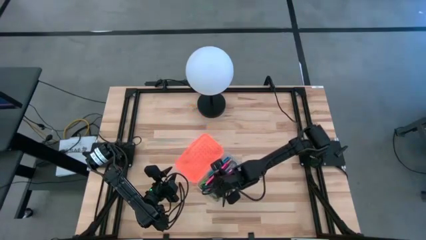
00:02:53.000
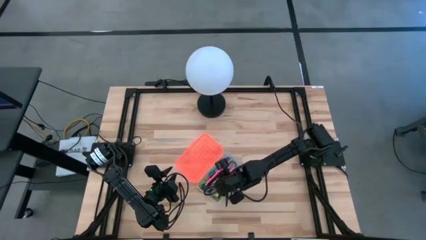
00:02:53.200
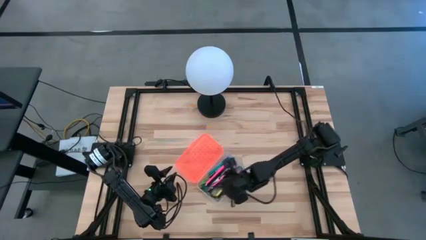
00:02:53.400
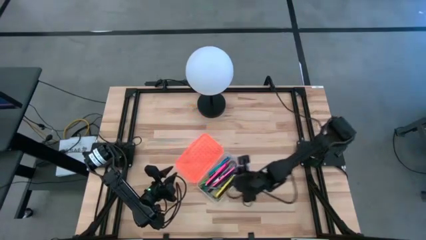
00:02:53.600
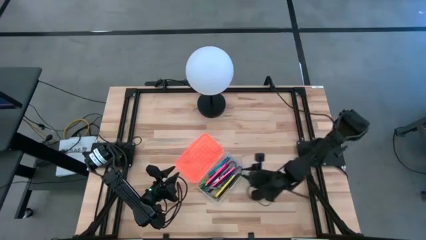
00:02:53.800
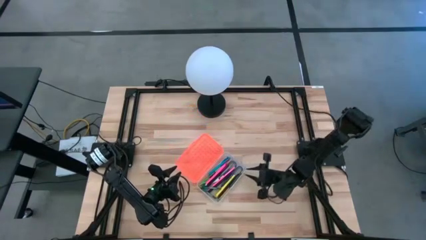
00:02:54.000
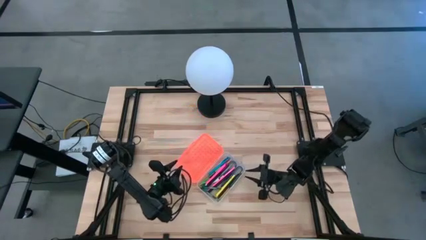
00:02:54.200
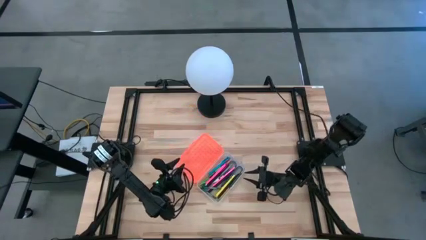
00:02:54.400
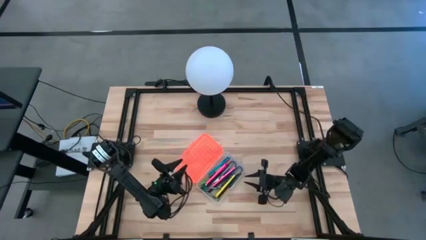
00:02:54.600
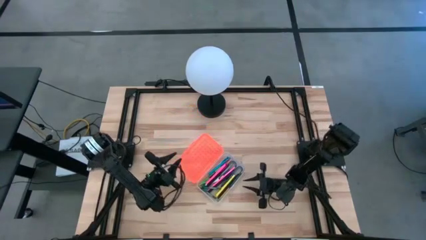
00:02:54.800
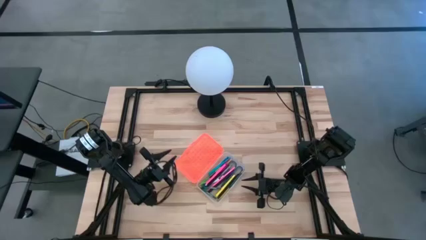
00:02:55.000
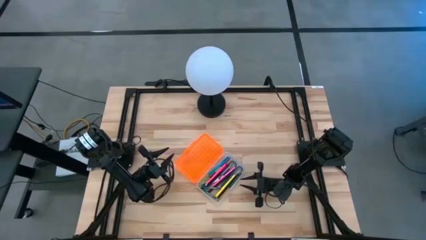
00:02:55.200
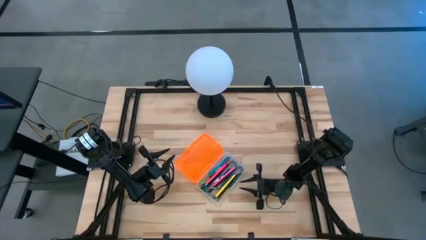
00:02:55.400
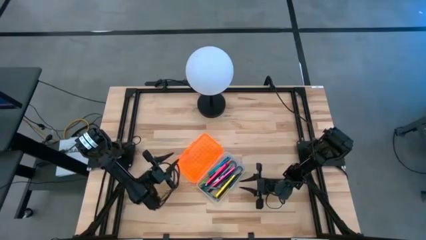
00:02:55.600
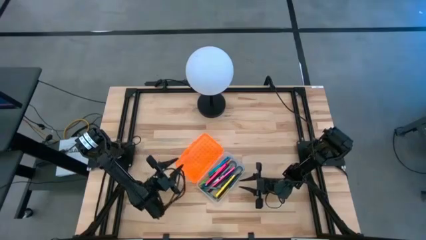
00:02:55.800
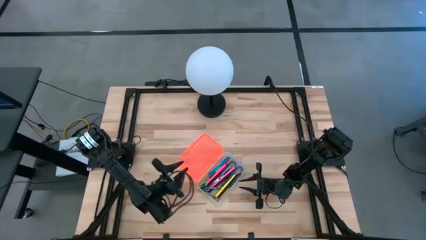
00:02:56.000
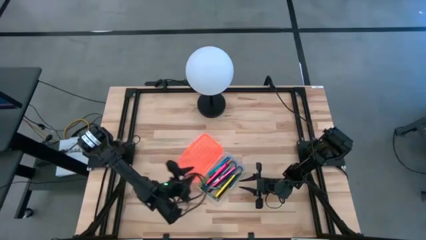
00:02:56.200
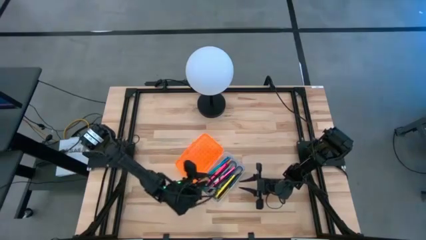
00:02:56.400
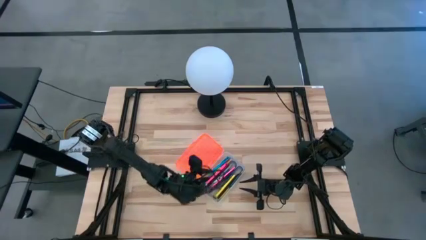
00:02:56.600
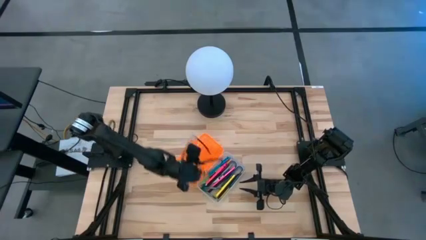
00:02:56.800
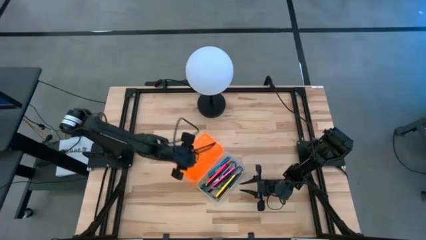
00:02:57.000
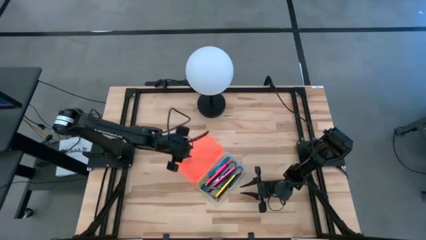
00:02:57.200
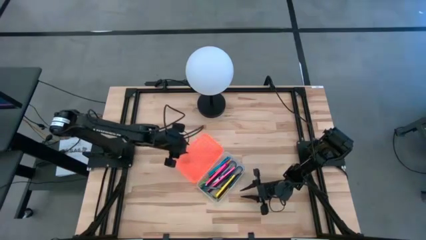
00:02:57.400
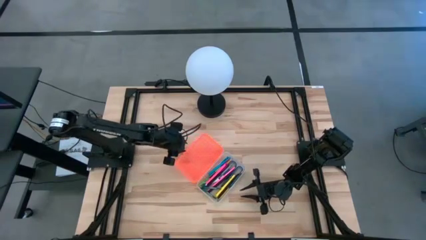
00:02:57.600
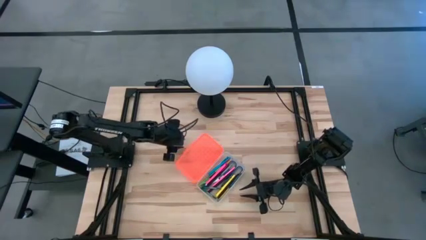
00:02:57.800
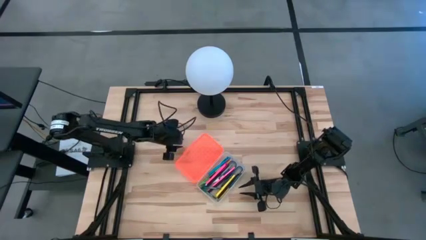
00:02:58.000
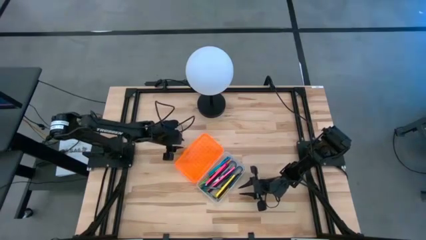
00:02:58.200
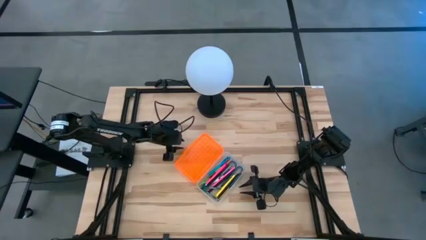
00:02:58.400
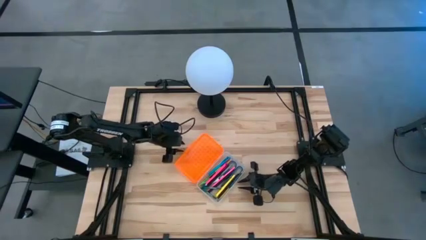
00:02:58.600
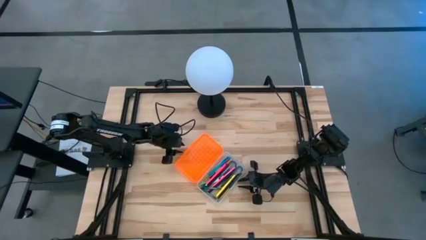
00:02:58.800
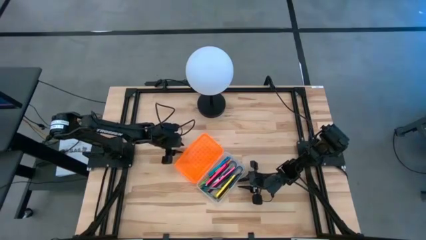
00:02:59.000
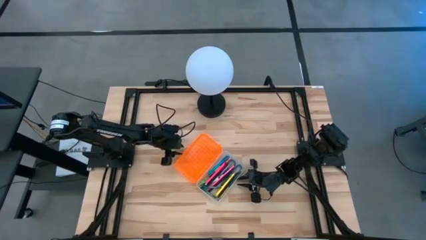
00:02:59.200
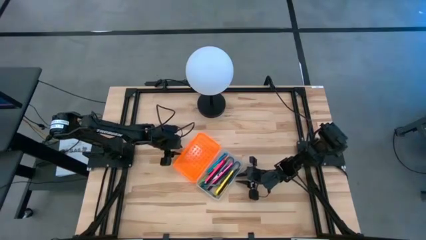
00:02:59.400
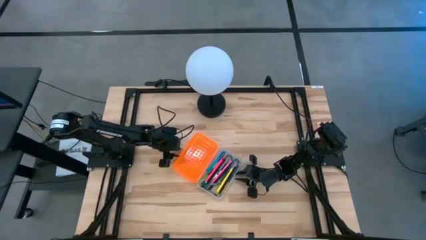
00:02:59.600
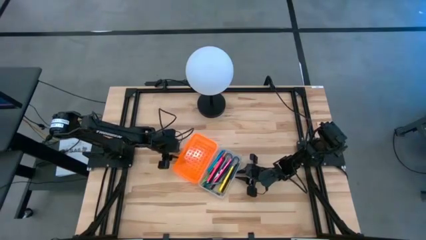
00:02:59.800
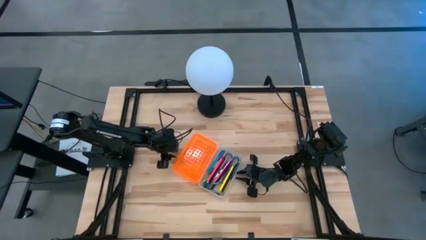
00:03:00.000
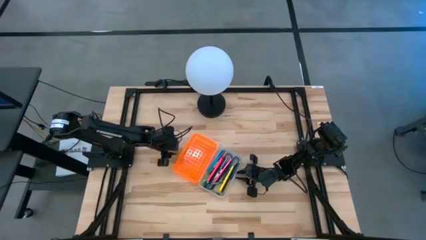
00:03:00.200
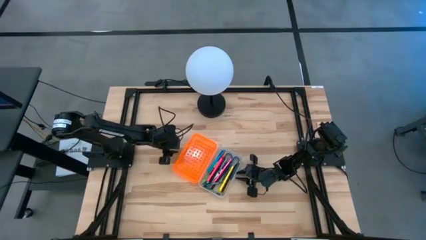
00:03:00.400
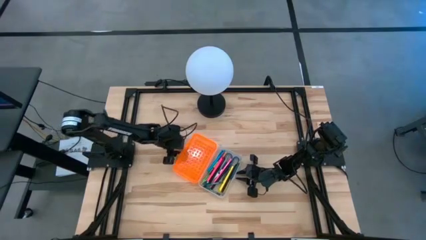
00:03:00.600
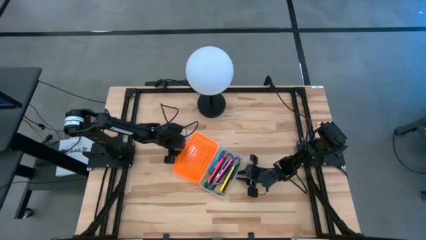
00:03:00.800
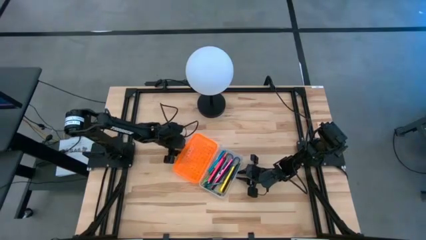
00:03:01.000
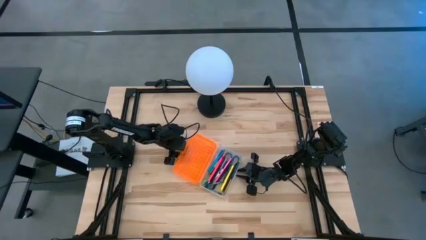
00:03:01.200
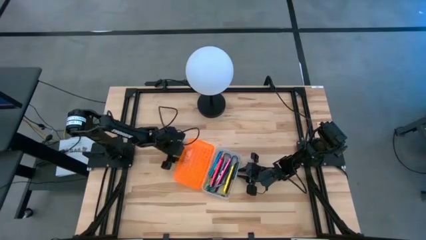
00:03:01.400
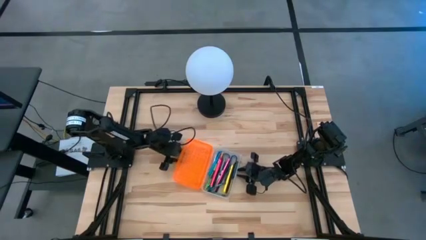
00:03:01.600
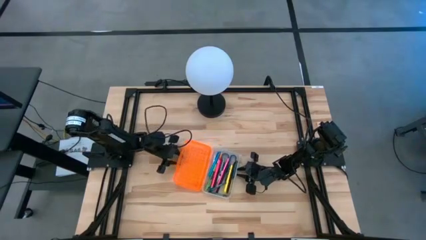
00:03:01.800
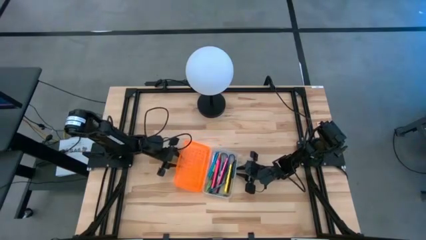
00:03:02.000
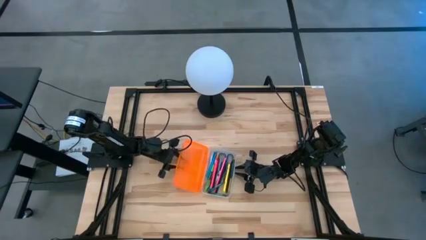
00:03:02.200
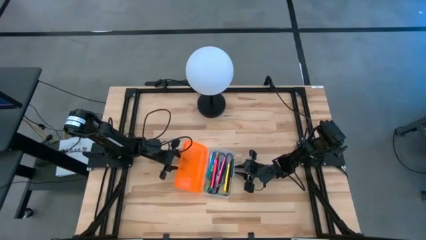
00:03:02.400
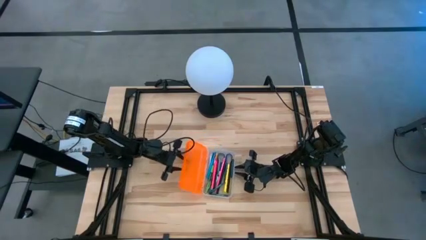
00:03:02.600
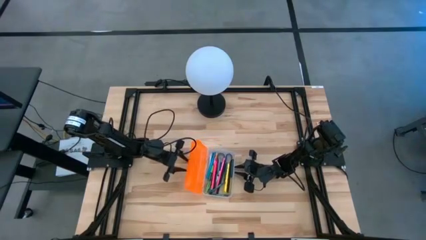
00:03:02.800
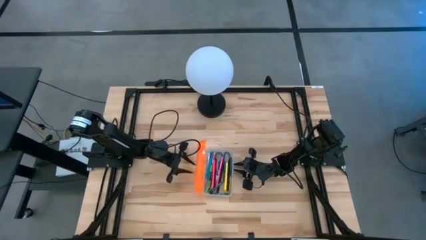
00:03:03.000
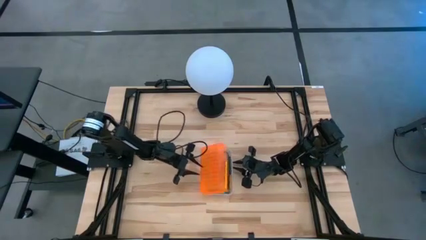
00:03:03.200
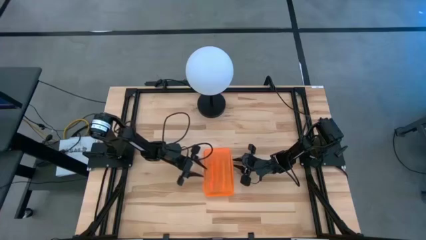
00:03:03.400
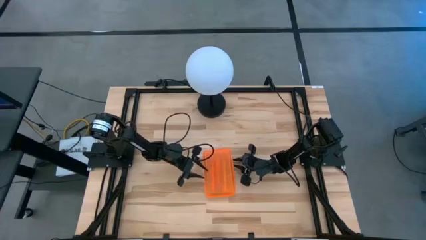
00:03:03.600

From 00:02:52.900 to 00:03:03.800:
Task: Pick & place school supplies into a supply box
Close the orange supply box

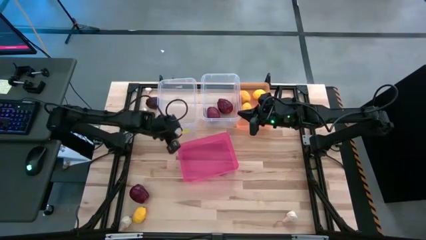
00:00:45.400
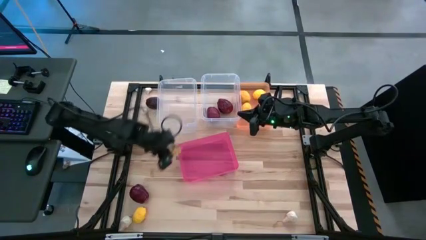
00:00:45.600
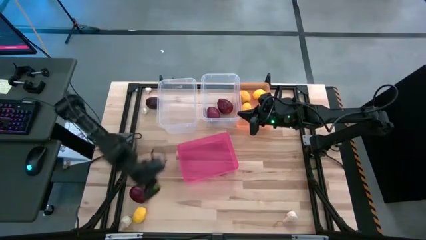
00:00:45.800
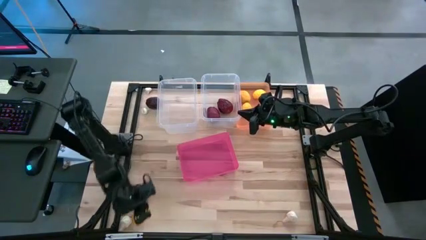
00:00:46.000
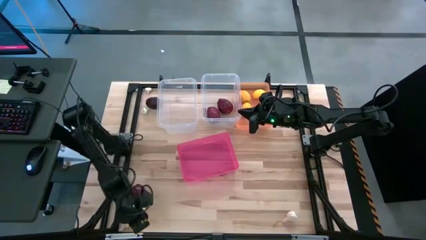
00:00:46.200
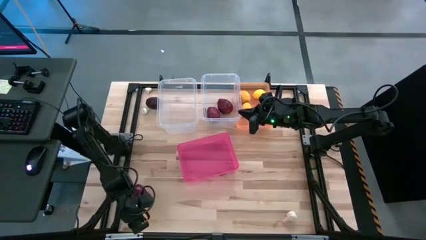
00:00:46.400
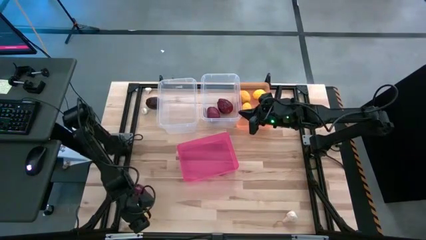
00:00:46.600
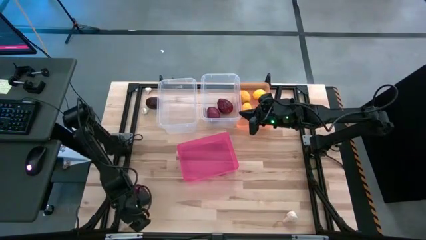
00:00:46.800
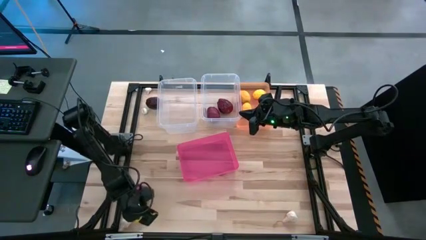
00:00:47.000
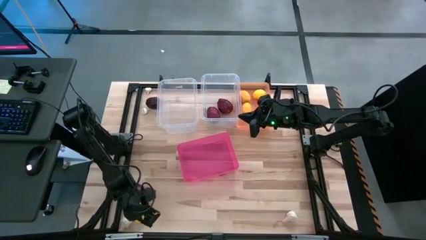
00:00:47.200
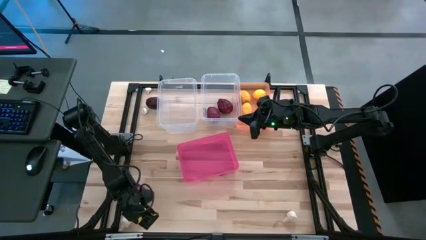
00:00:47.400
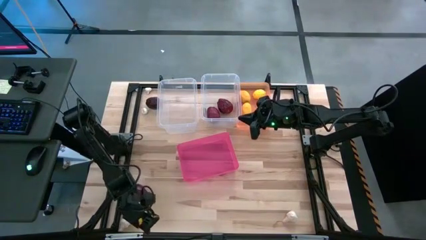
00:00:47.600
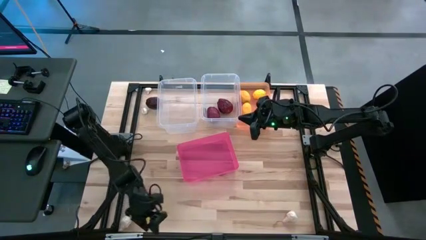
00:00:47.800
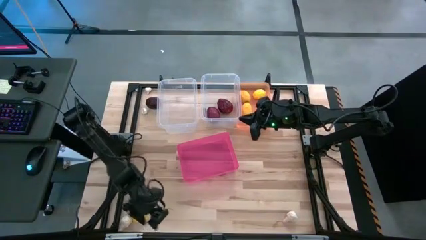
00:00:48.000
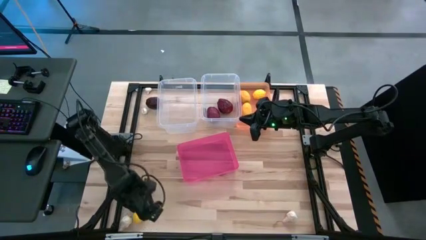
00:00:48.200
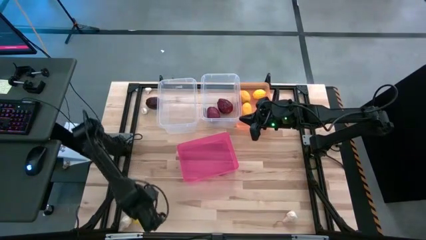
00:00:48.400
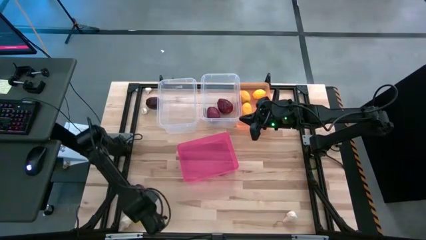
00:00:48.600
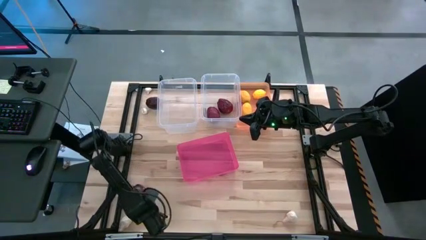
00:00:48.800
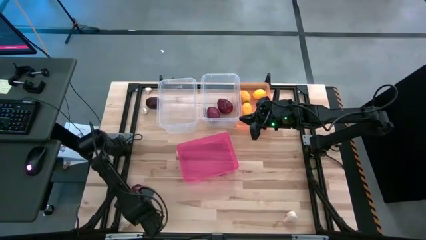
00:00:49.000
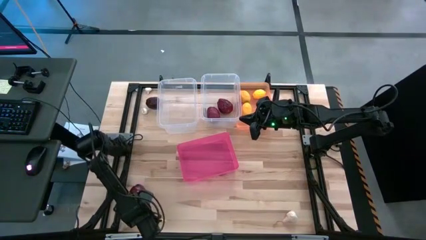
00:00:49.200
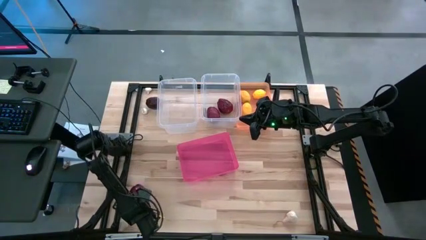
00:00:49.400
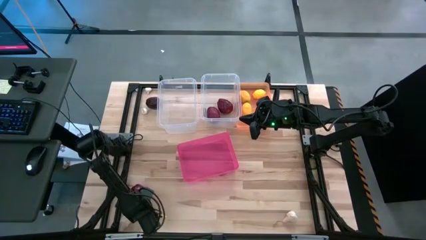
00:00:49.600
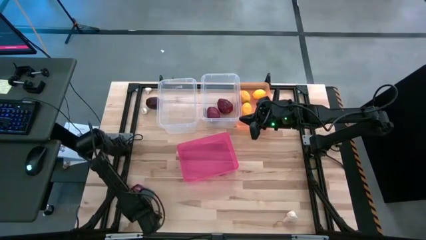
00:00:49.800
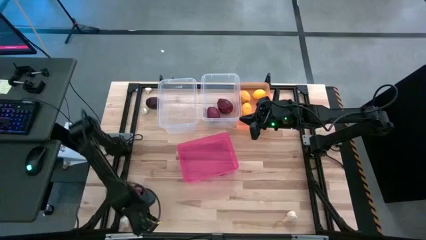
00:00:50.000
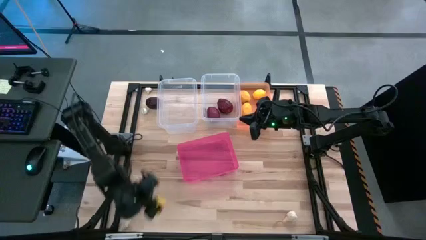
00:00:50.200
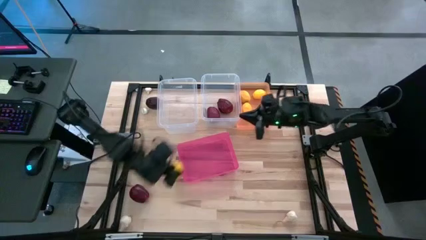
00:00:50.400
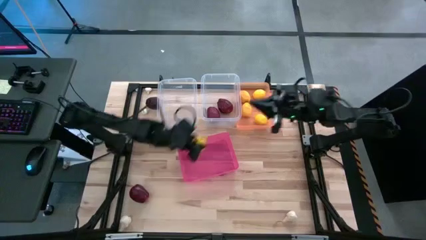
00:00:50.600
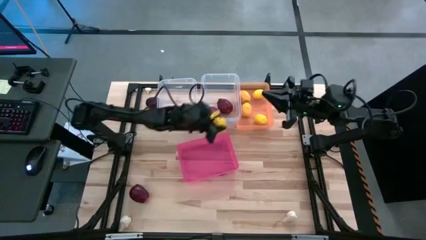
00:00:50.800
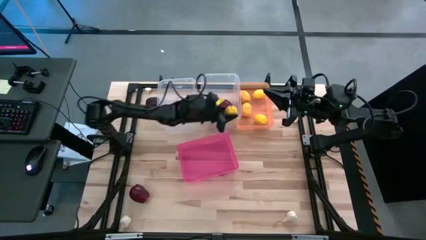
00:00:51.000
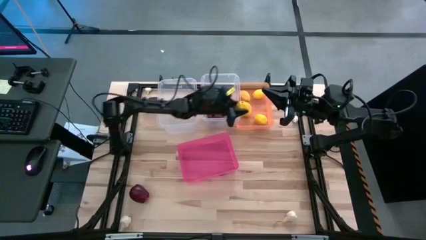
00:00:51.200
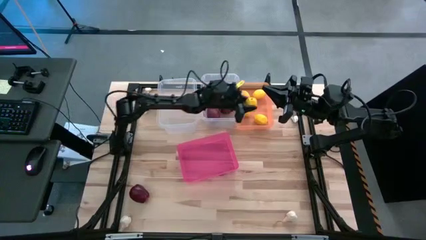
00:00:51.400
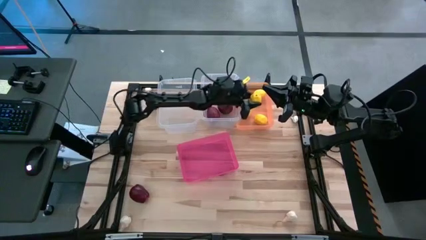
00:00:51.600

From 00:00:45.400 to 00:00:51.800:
Task: Sort produce into baskets
Put the yellow lemon into the orange bin
